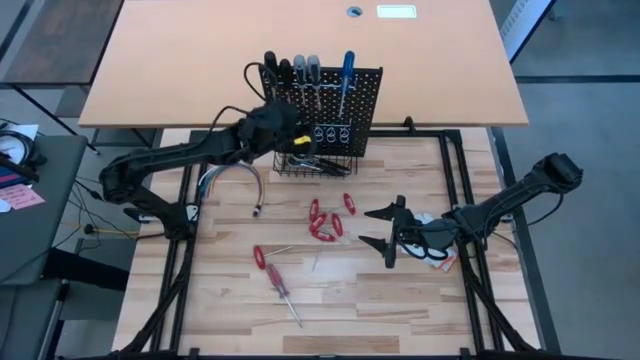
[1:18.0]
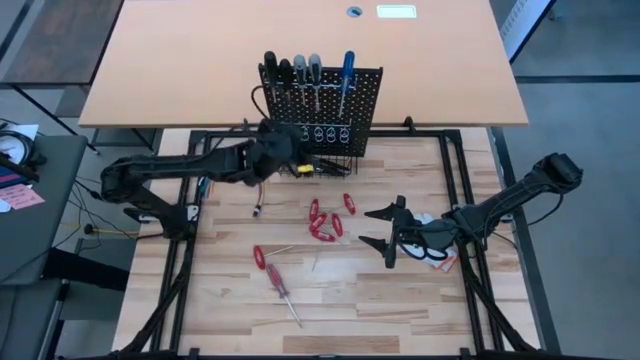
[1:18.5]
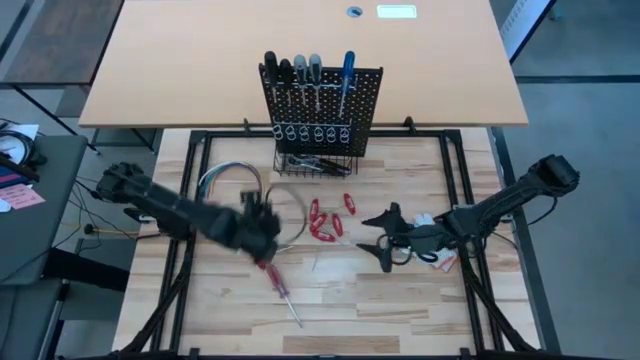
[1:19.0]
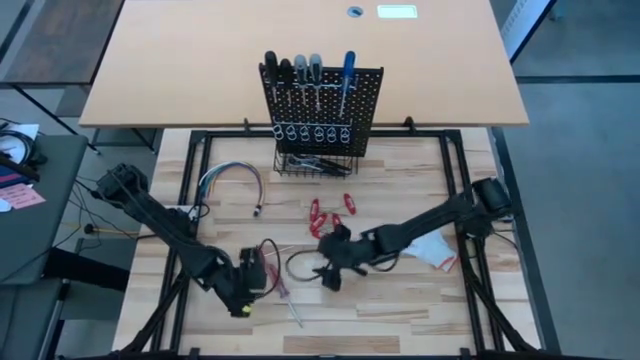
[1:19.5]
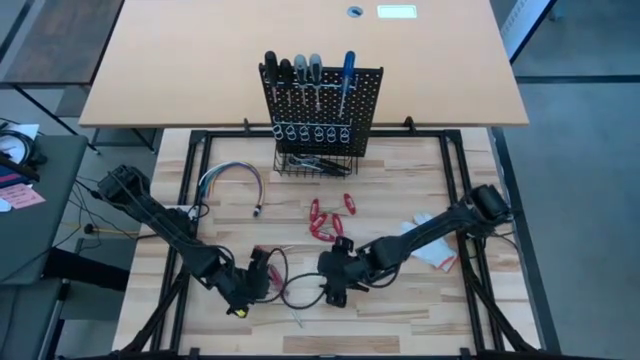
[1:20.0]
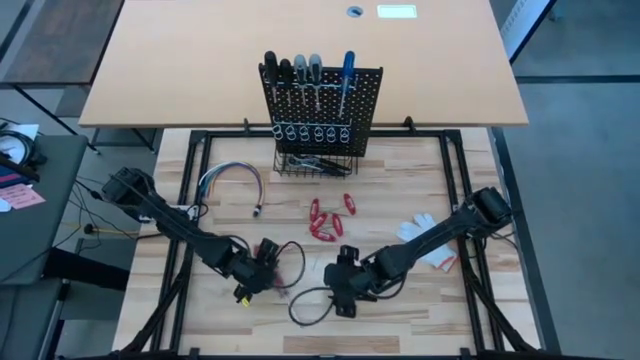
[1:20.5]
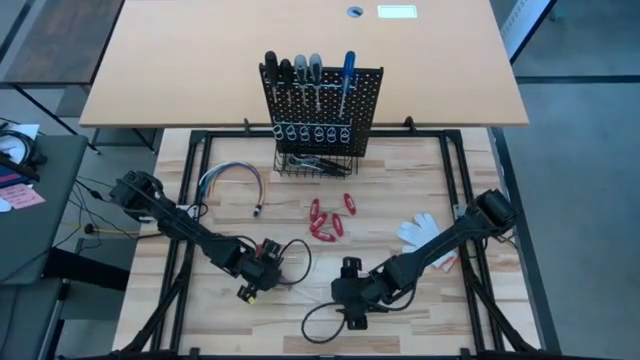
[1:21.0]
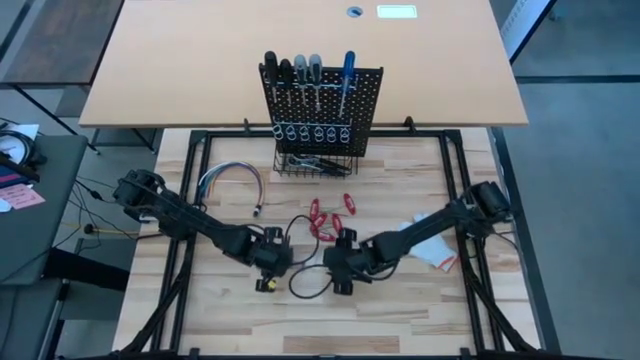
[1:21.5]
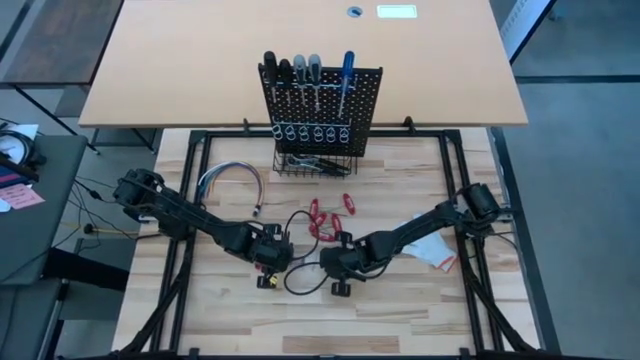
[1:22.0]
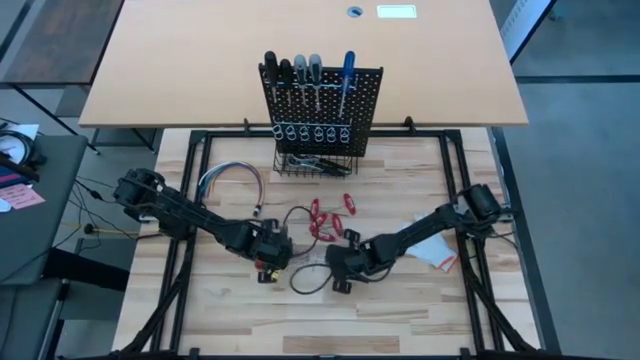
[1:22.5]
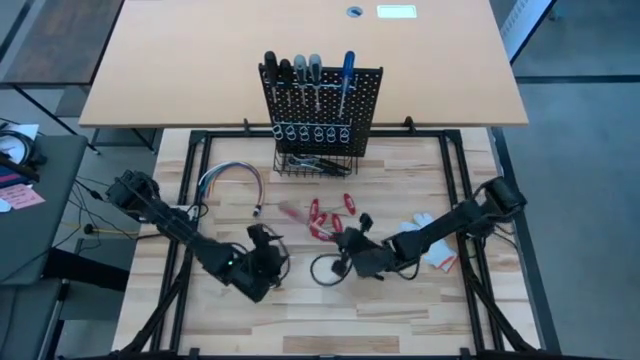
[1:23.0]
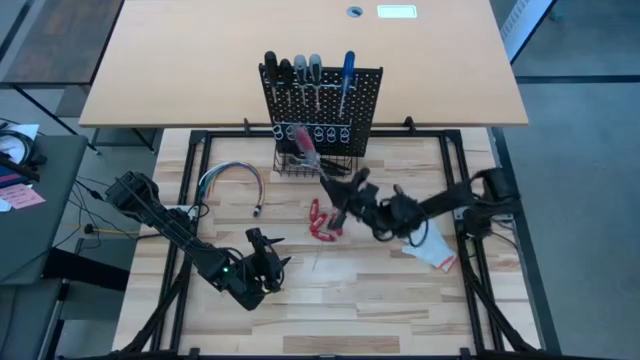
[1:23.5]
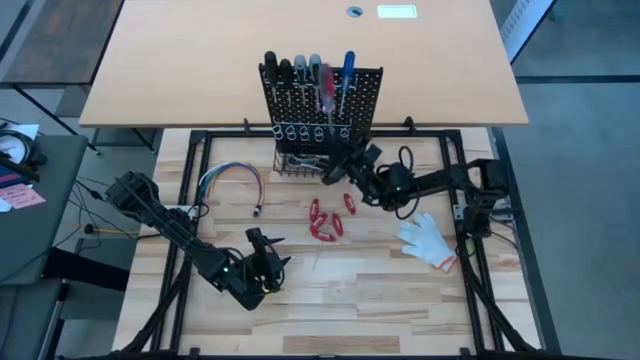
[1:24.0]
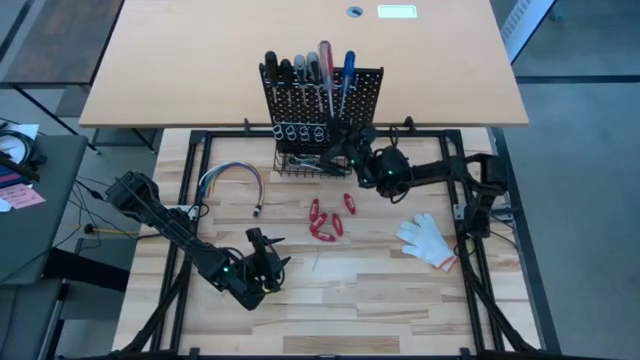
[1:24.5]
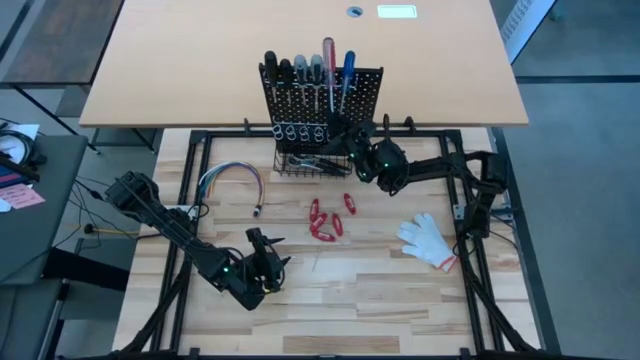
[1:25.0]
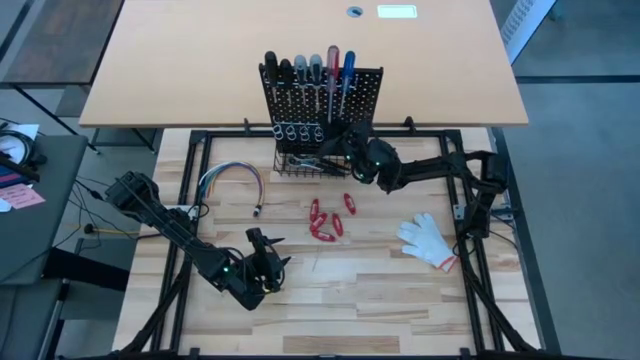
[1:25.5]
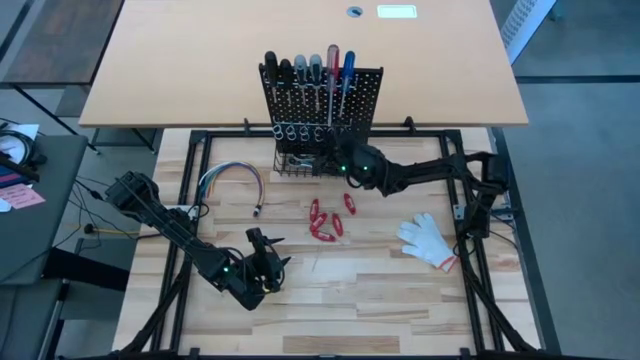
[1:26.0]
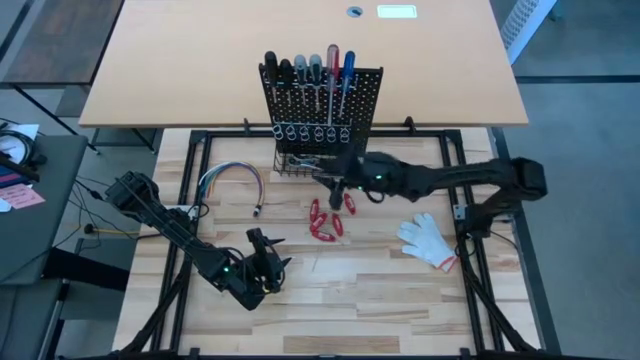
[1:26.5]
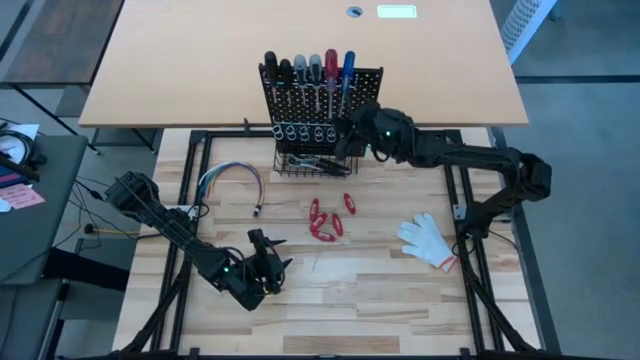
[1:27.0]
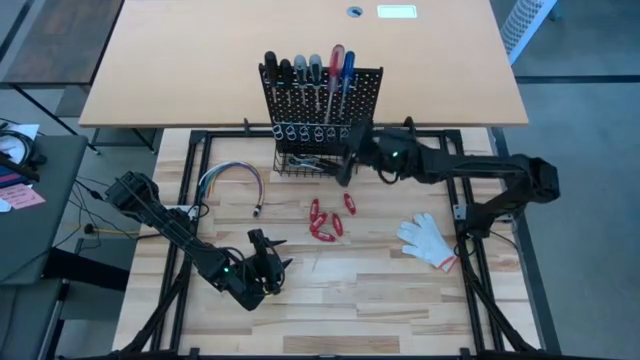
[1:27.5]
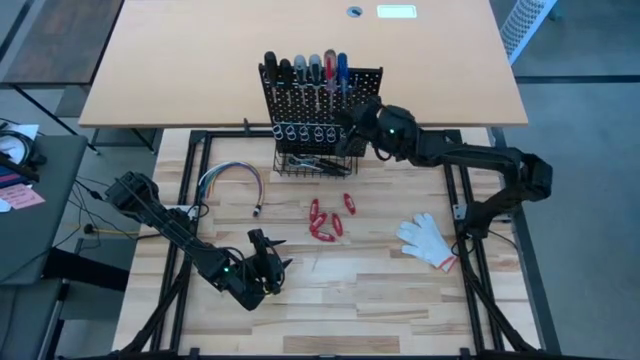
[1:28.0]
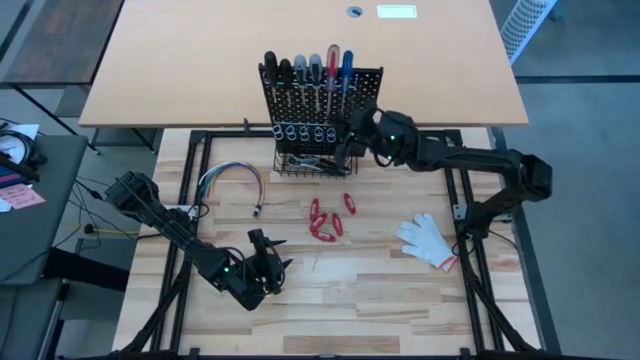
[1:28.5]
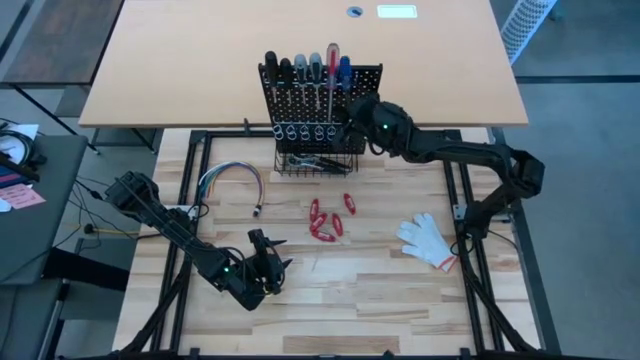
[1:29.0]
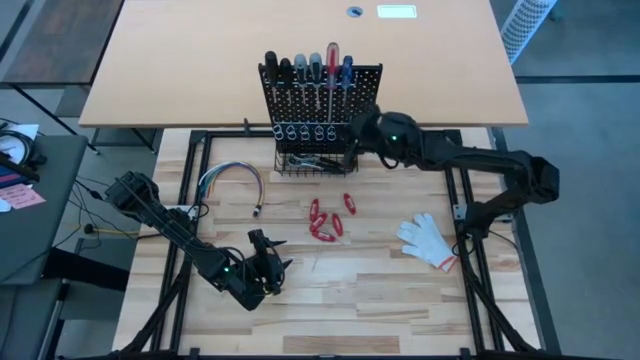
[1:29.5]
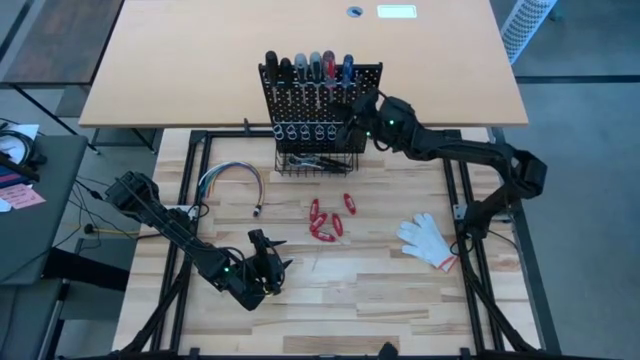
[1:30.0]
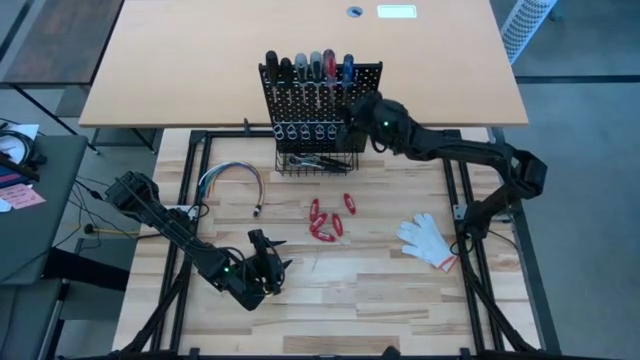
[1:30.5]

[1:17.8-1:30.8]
Task: Hang tools onto peg board
Hang the red screwdriver on the pegboard

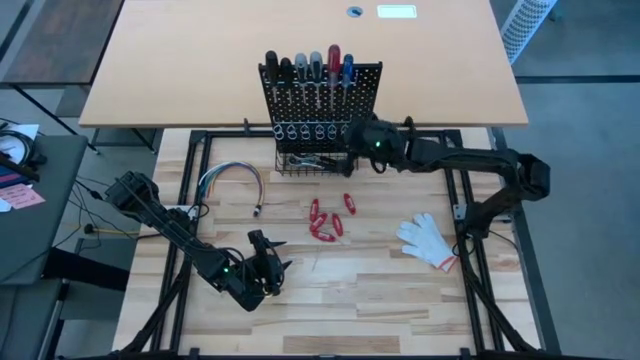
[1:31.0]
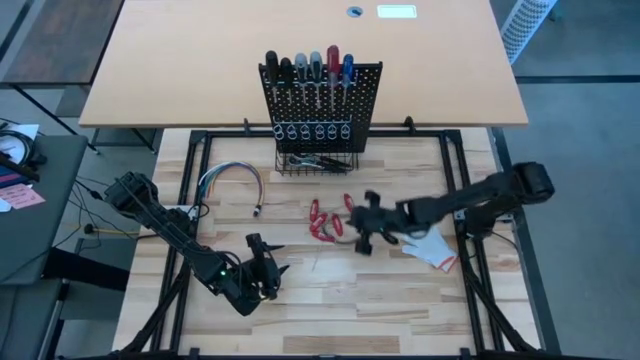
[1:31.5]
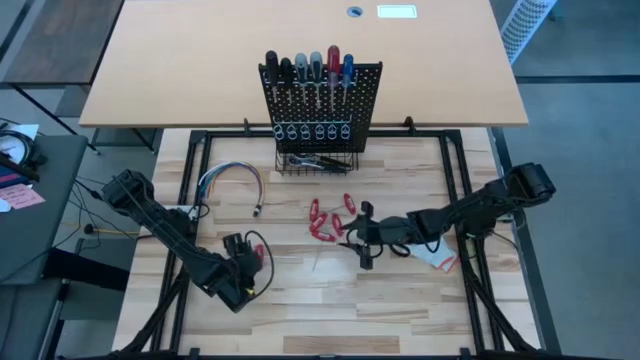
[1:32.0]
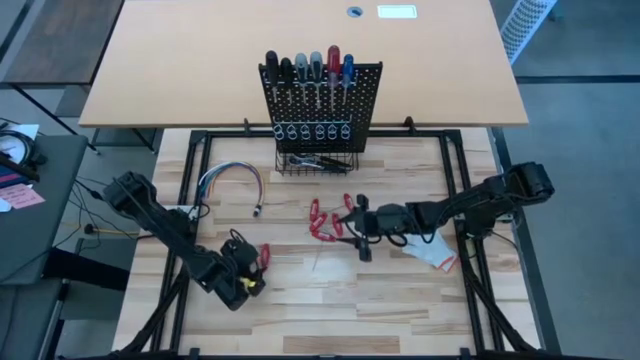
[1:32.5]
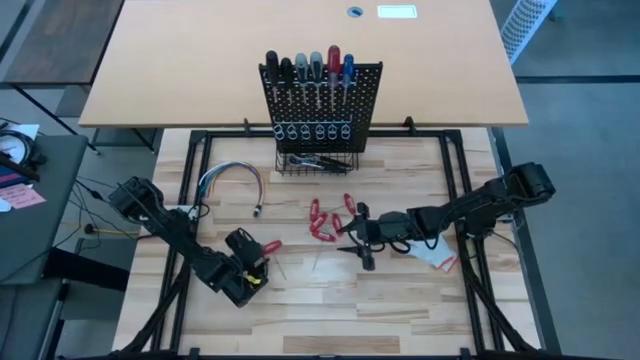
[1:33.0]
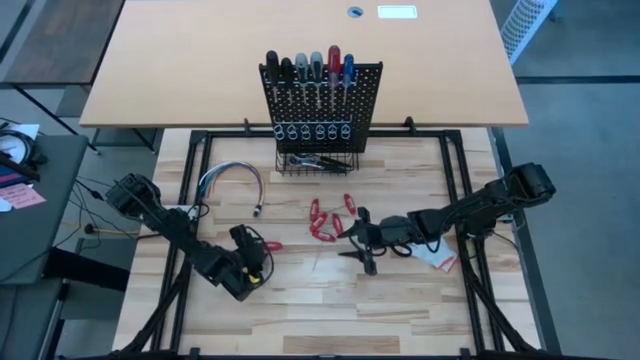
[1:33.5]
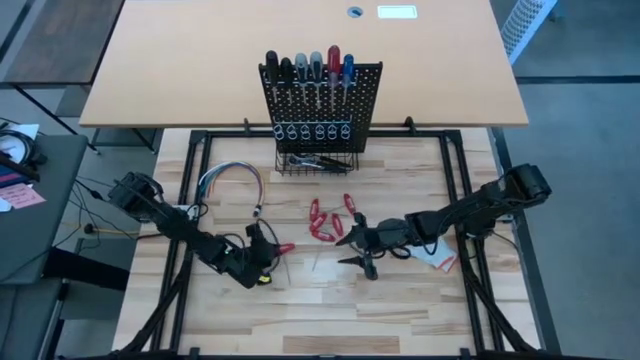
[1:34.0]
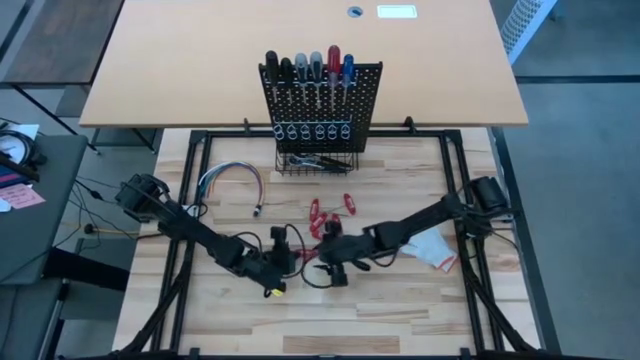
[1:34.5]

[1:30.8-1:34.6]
Hang the red allen wrench on the pegboard

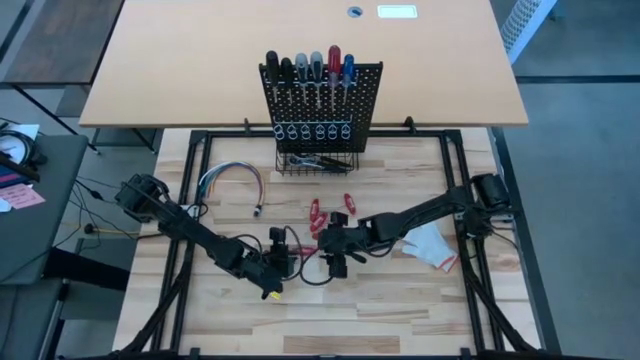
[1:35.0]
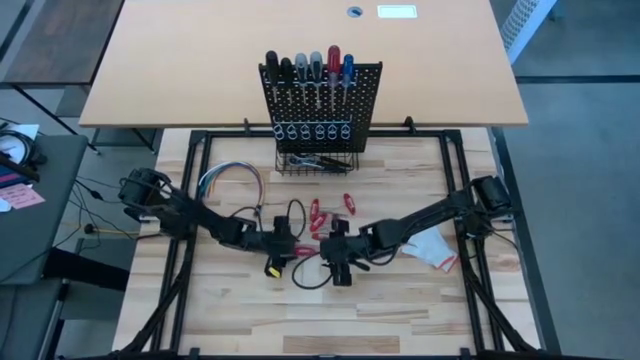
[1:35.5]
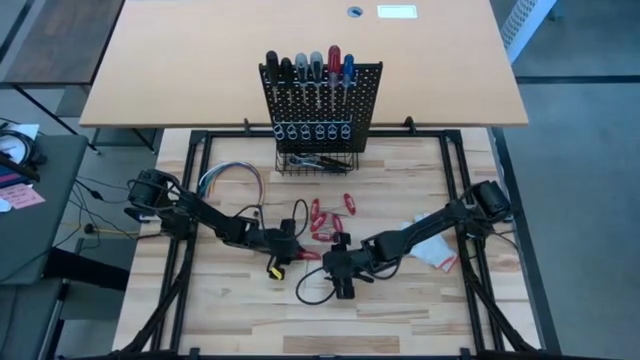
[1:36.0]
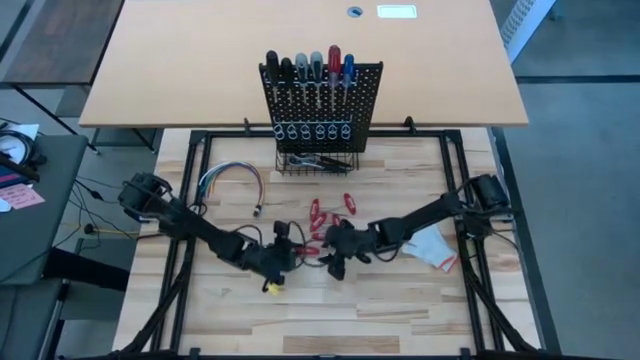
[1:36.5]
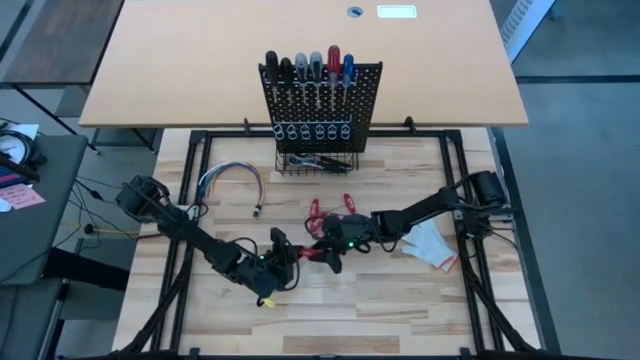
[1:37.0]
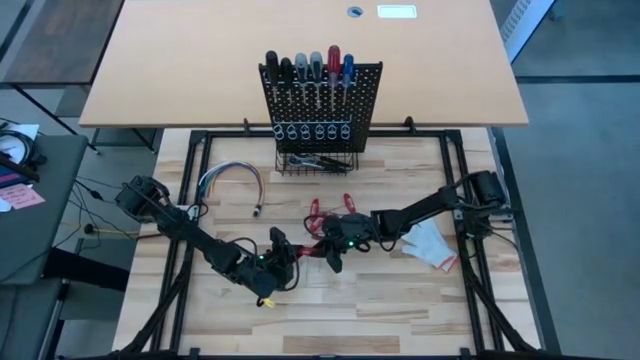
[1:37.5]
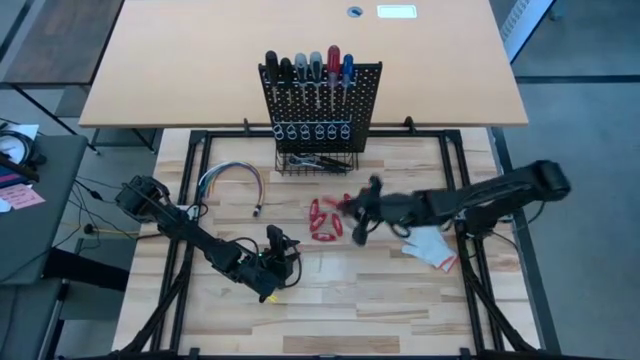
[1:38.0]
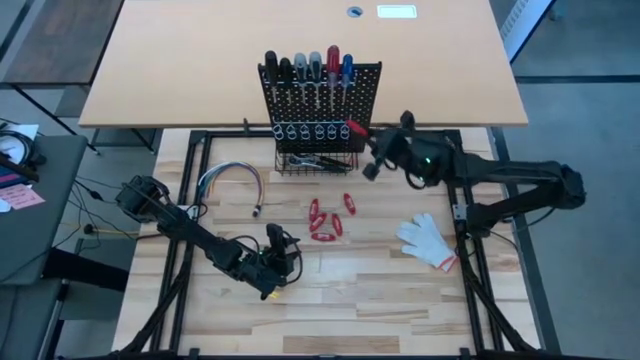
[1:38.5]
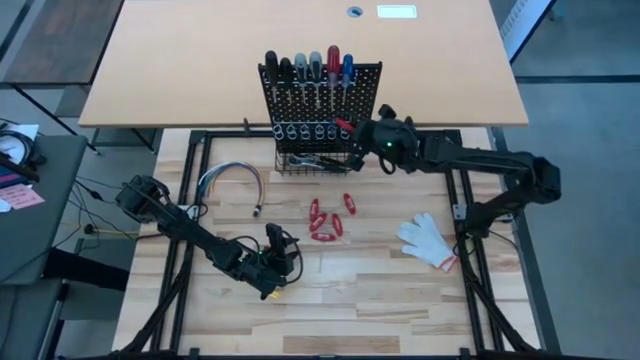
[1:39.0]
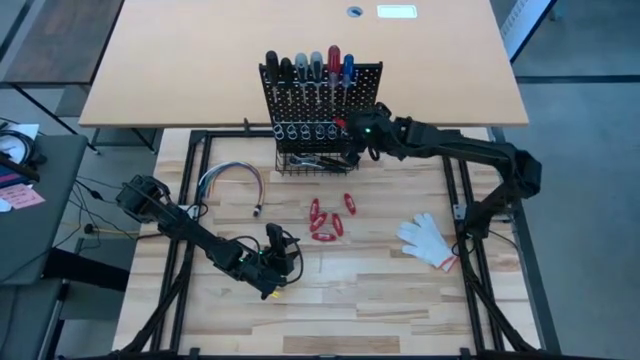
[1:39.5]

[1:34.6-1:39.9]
Hang the red allen wrench on the pegboard
